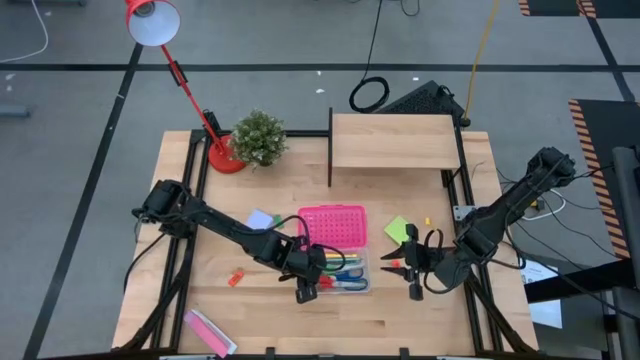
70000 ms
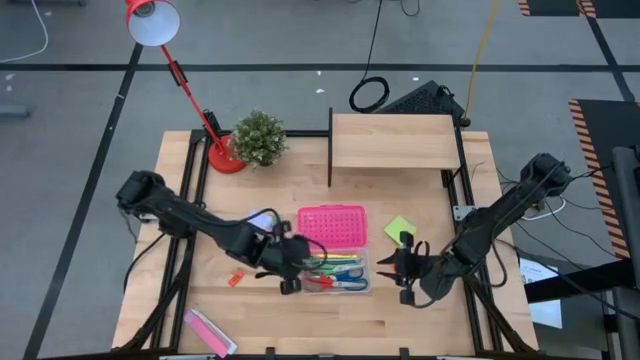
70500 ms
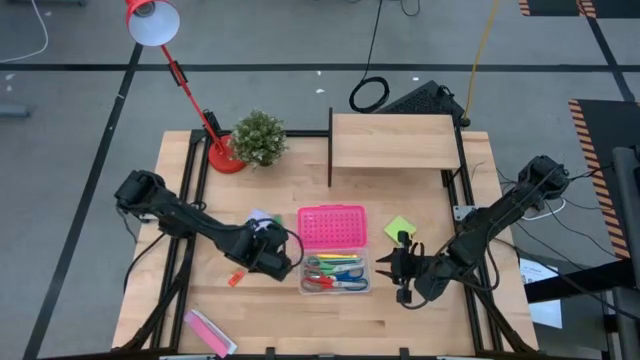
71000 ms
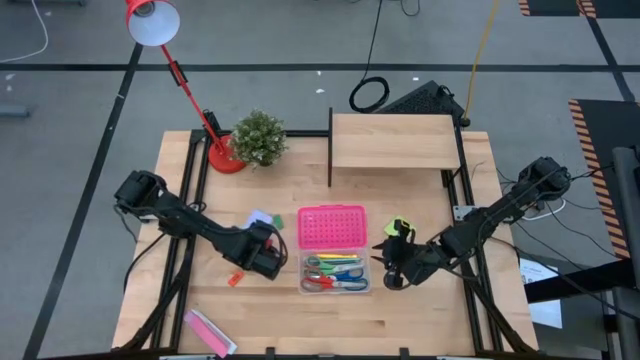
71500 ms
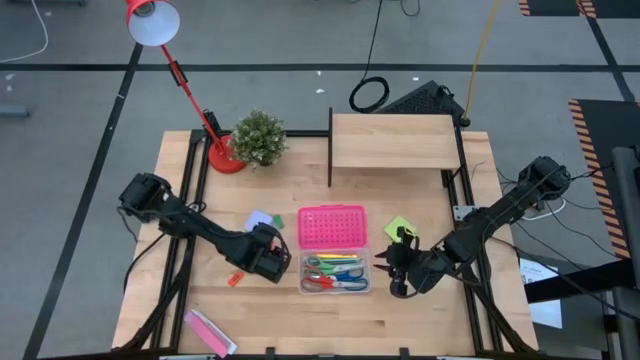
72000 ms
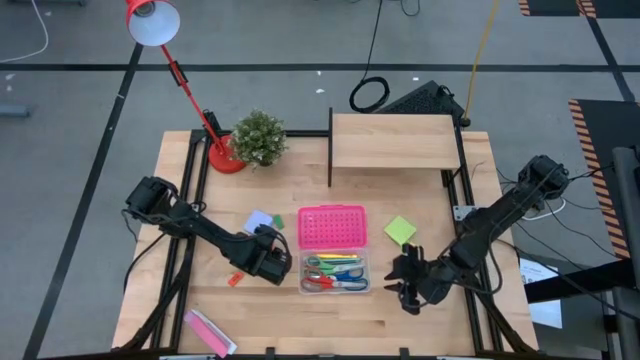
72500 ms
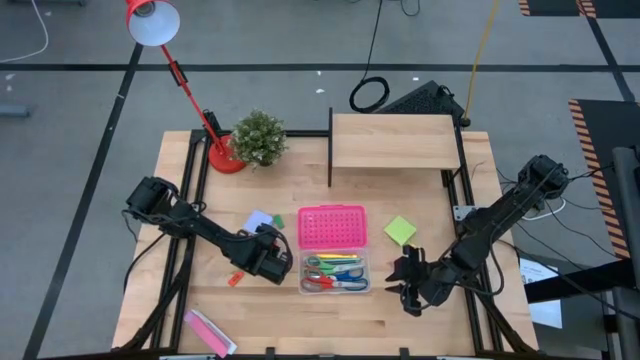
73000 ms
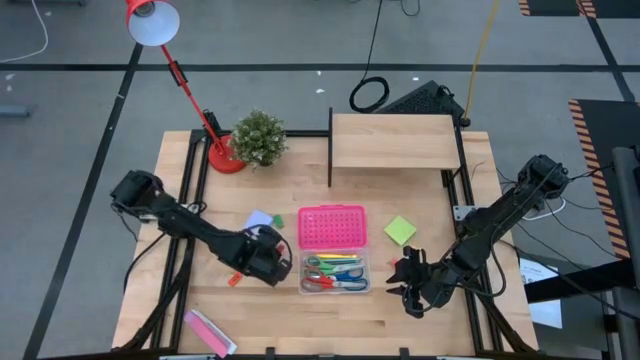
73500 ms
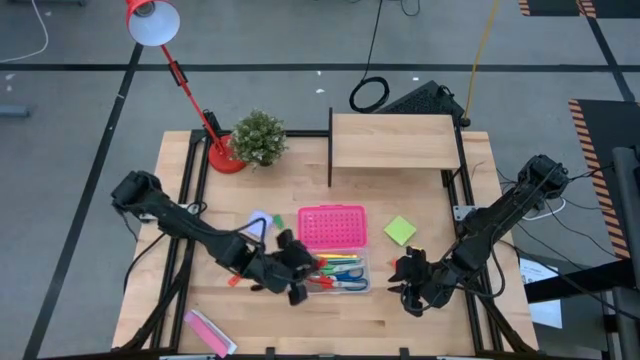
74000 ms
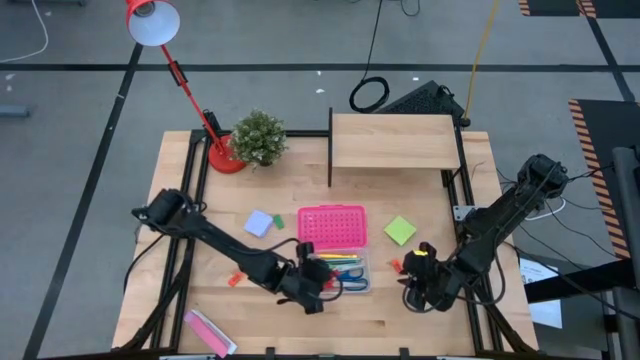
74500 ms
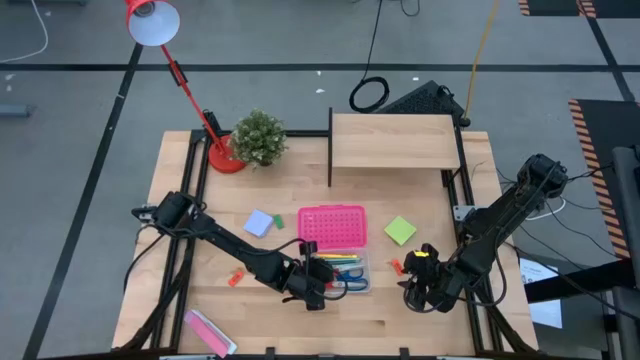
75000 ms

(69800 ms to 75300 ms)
Task: Pack school essentials
Put the red eraser into the pink supply box

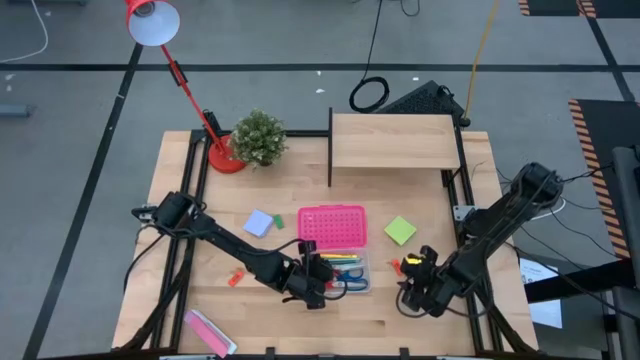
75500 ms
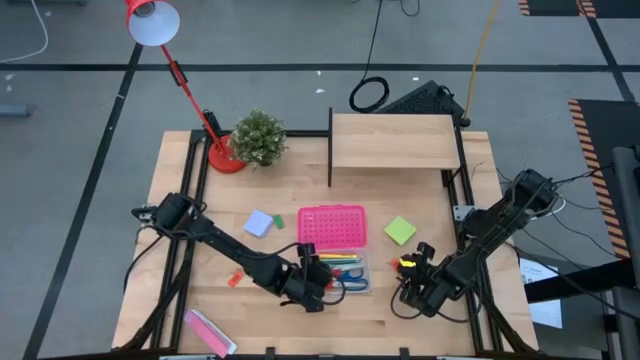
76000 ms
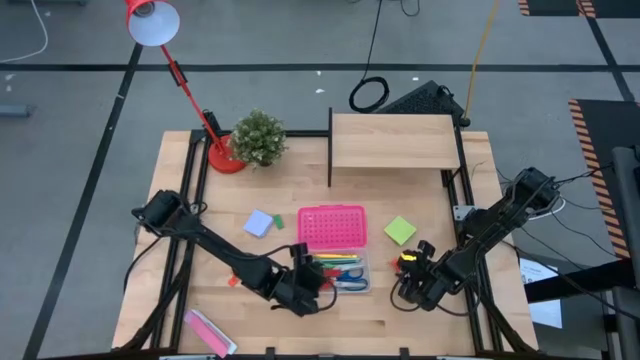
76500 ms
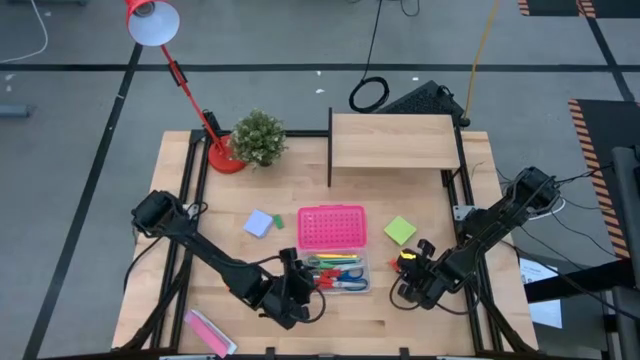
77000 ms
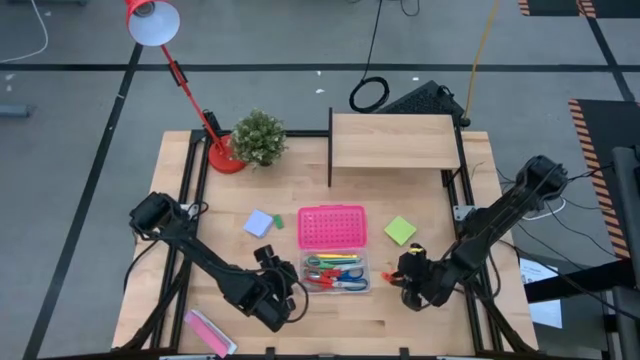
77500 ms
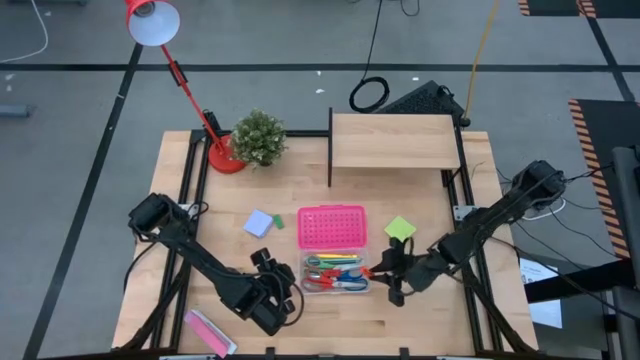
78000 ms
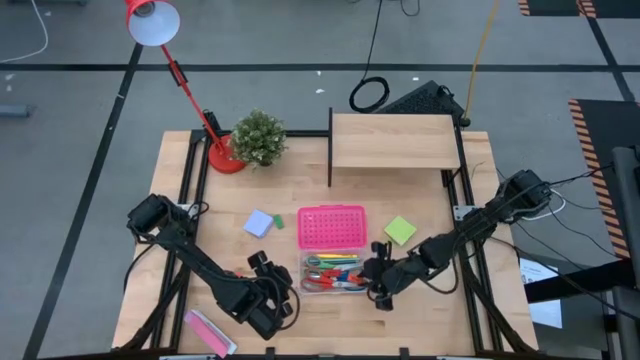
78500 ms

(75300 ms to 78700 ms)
Put the right orange eraser into the pink supply box

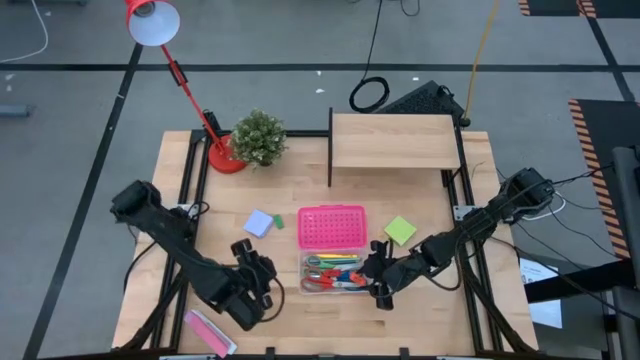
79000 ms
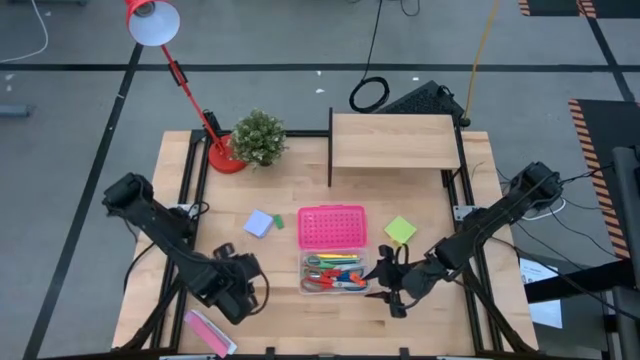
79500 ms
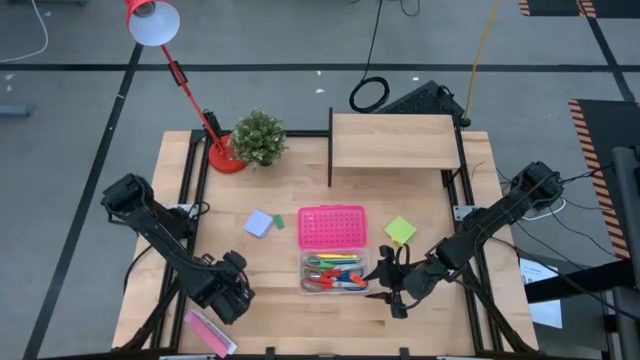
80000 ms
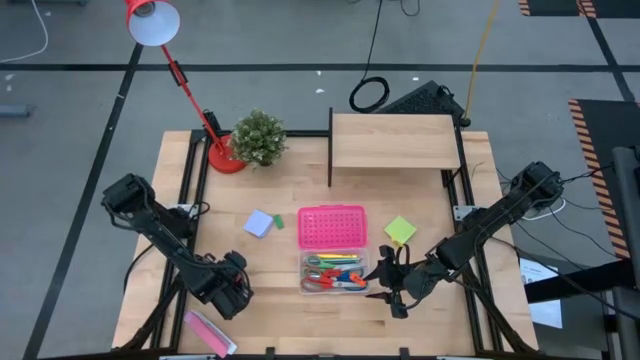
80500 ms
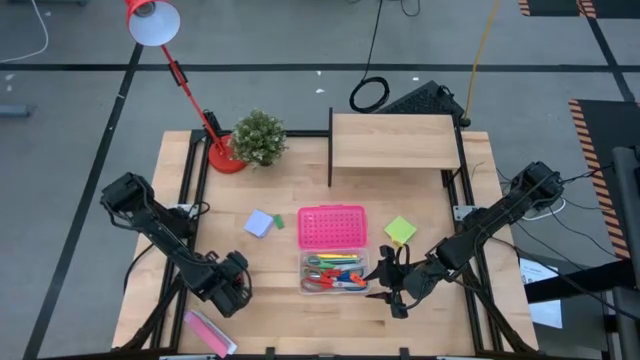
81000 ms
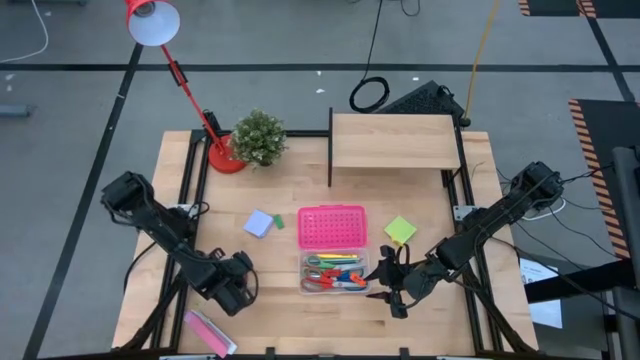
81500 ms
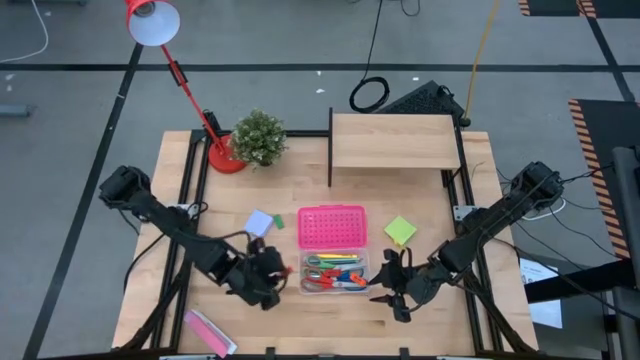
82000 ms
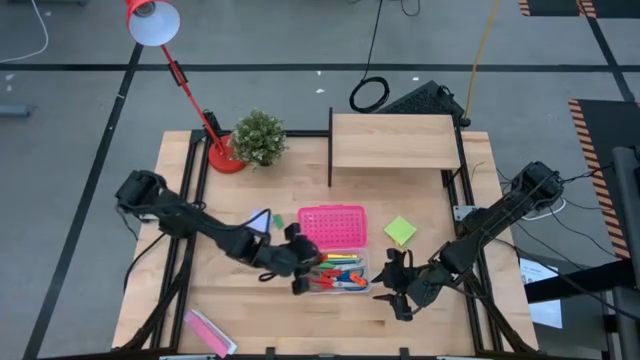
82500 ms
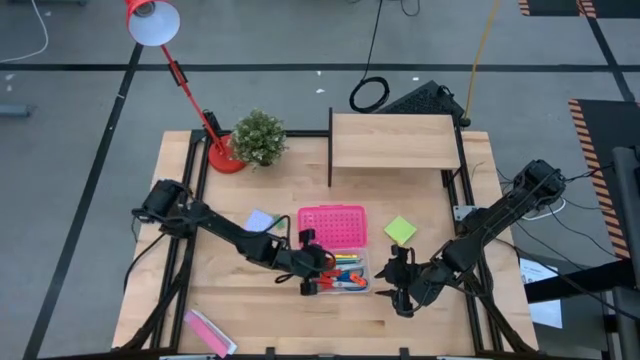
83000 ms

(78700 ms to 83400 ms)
Put the orange eraser into the pink supply box

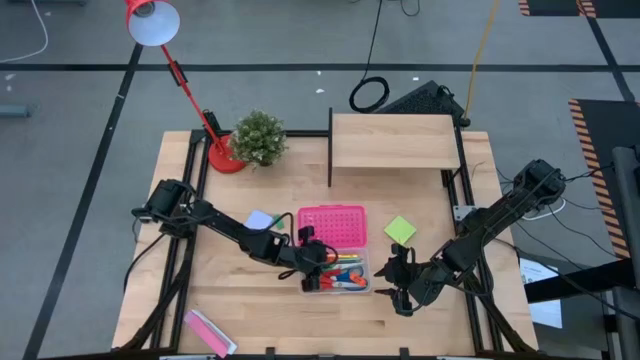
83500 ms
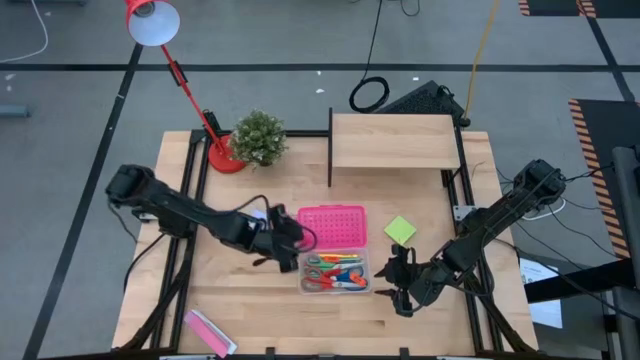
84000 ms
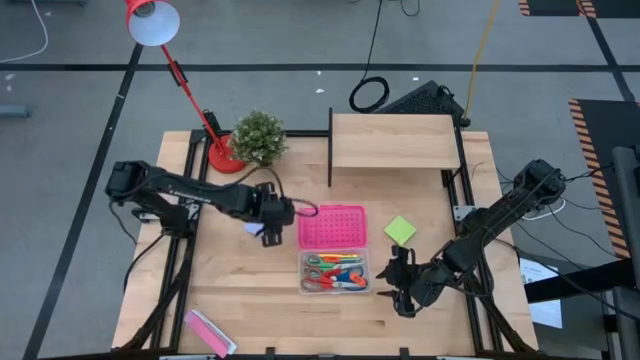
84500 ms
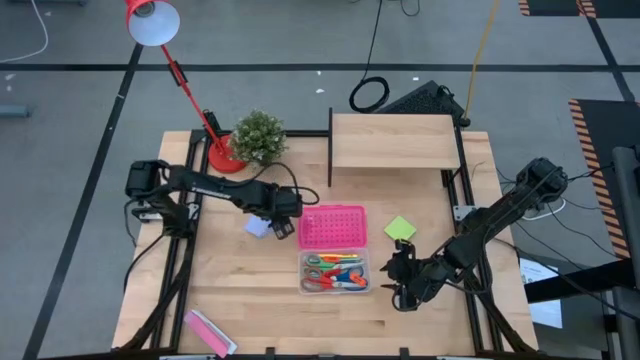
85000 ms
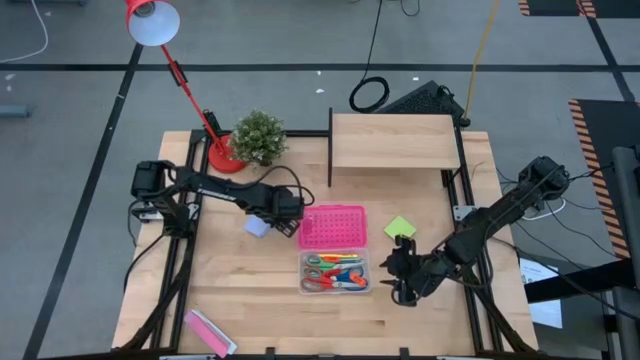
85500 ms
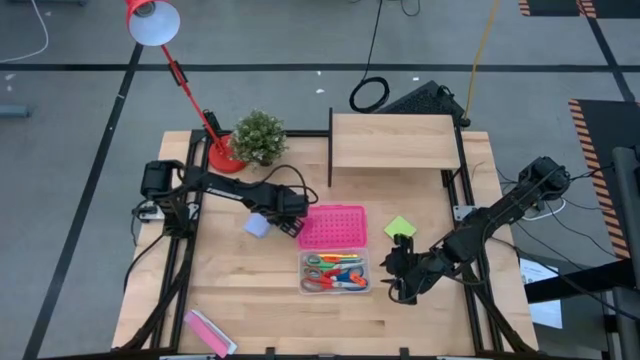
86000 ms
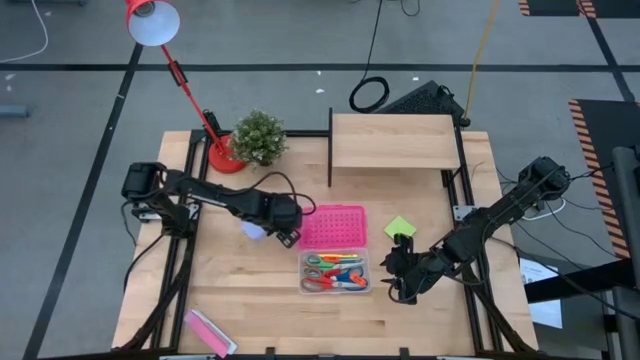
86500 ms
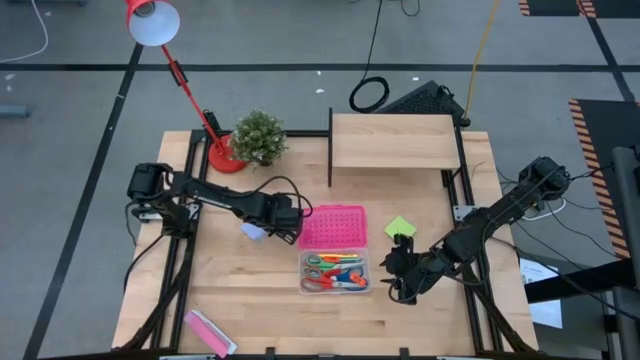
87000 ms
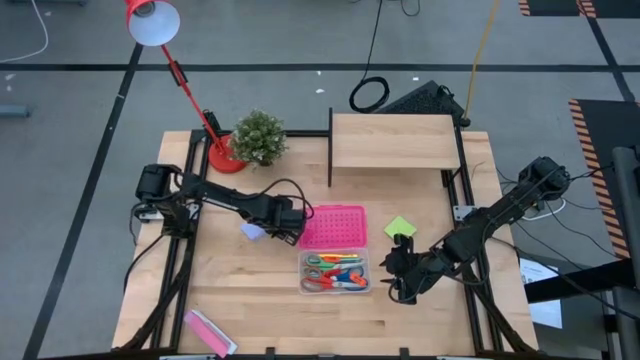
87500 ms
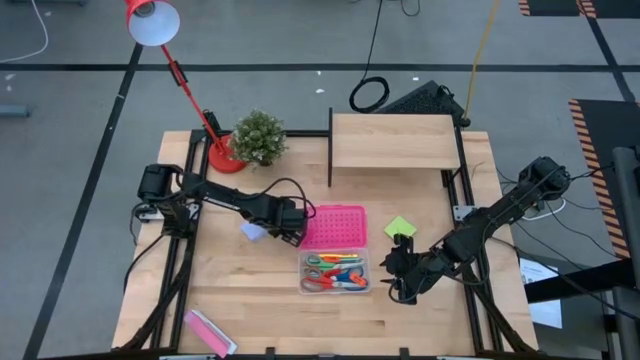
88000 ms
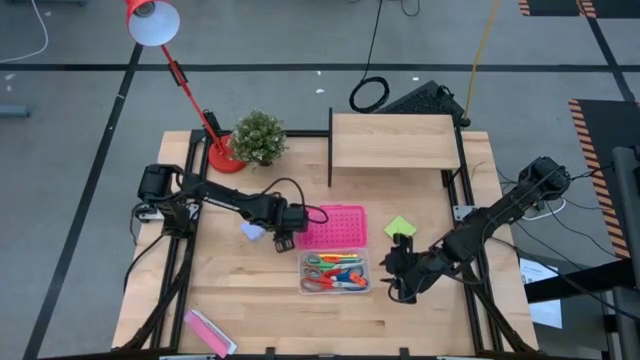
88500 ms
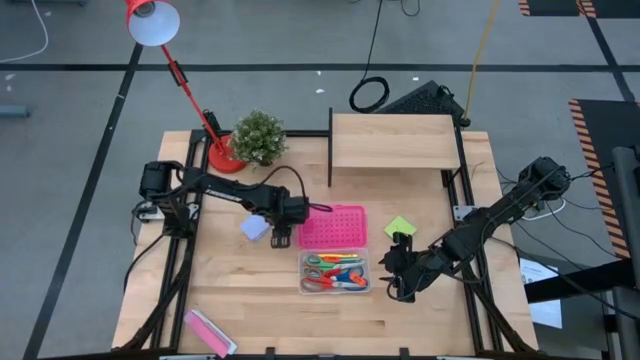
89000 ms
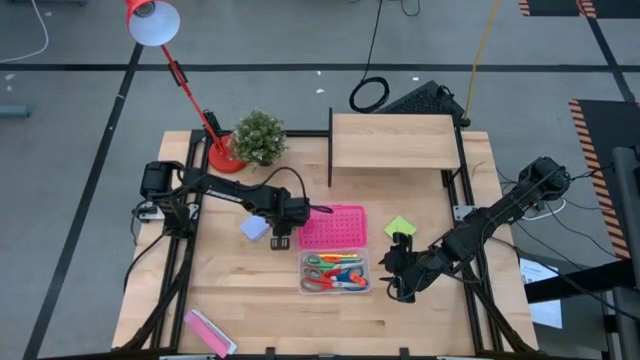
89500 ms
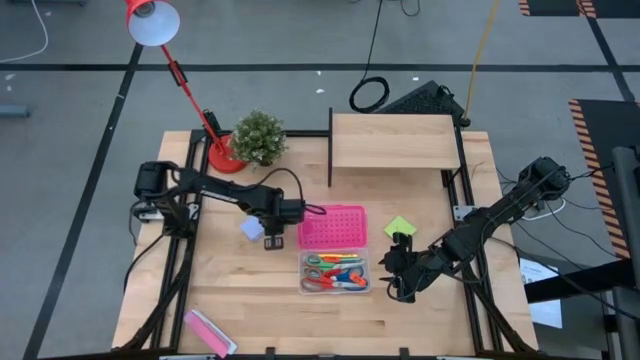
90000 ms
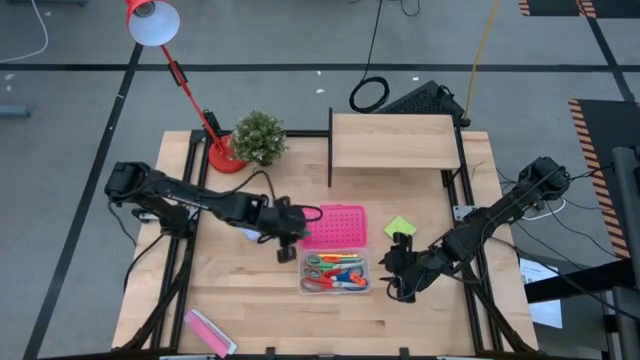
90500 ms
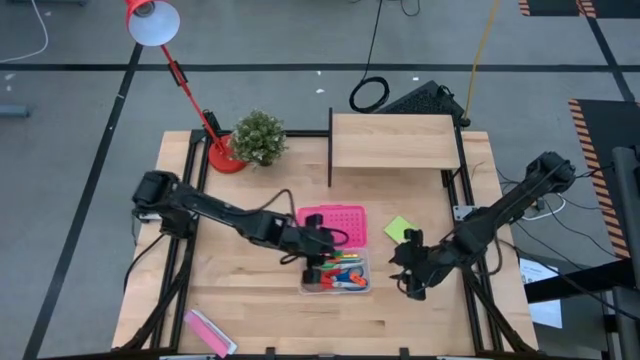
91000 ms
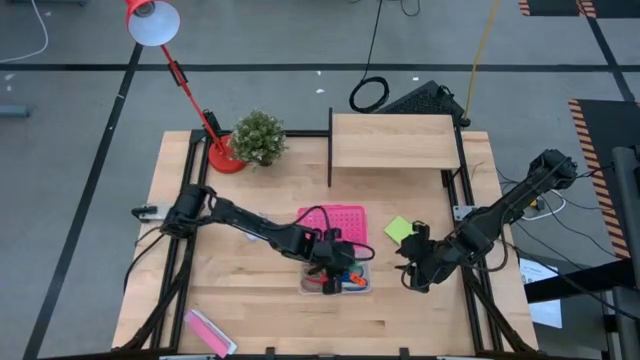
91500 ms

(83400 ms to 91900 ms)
Put the green eraser into the pink supply box
